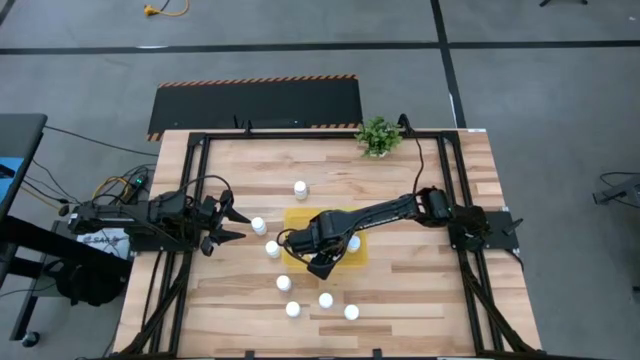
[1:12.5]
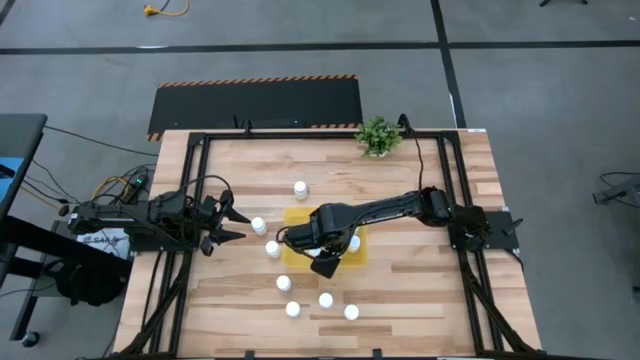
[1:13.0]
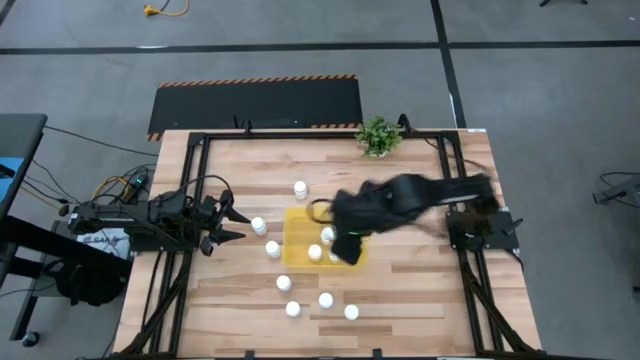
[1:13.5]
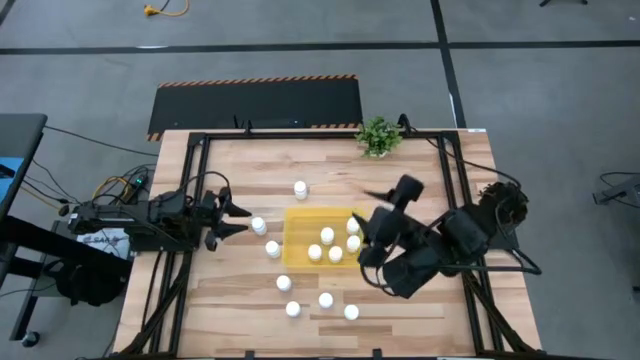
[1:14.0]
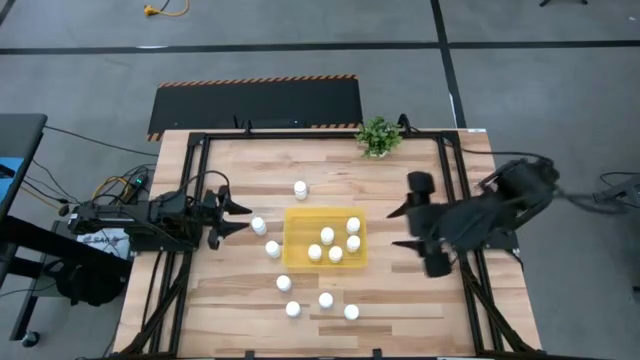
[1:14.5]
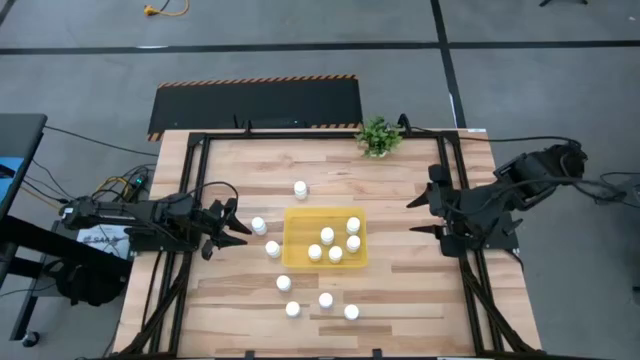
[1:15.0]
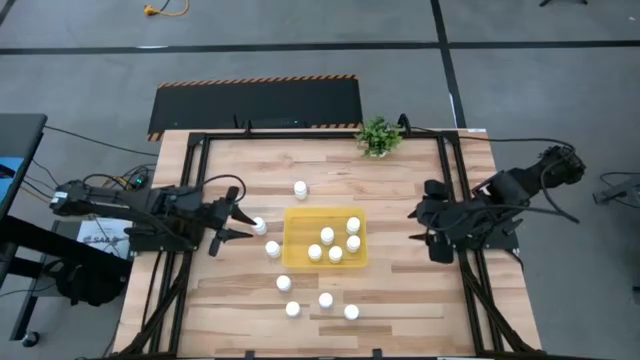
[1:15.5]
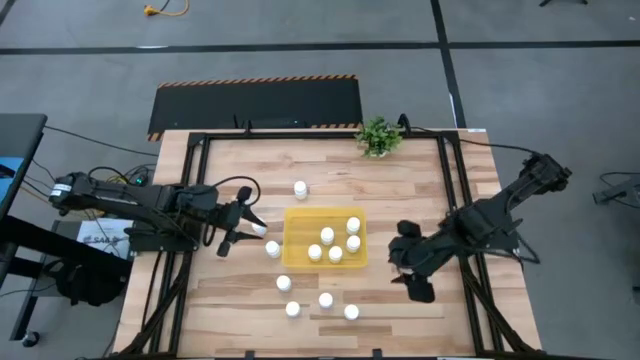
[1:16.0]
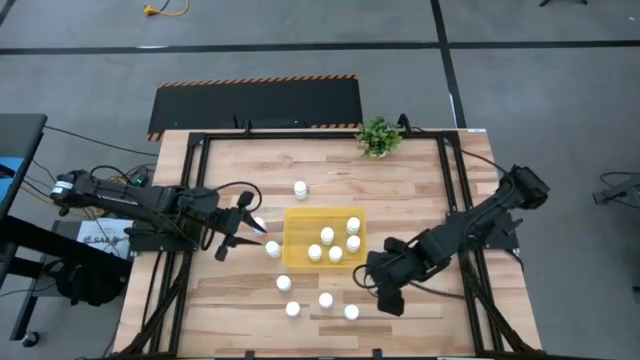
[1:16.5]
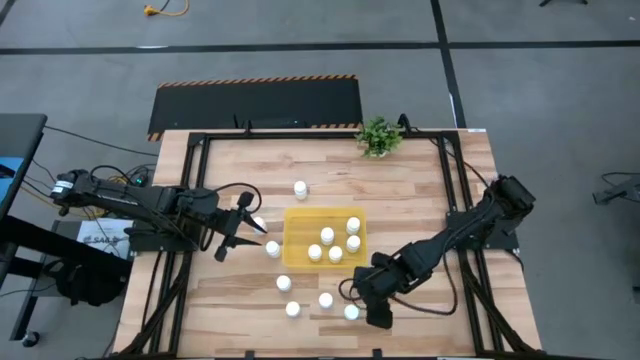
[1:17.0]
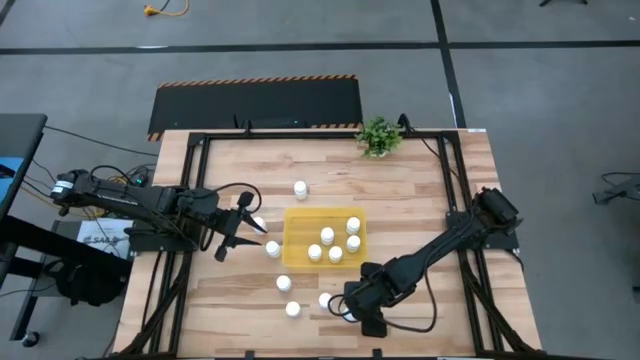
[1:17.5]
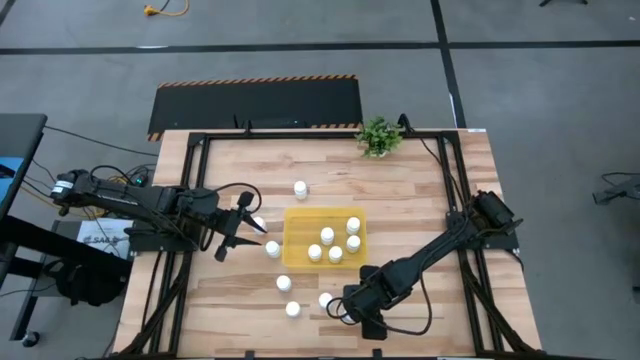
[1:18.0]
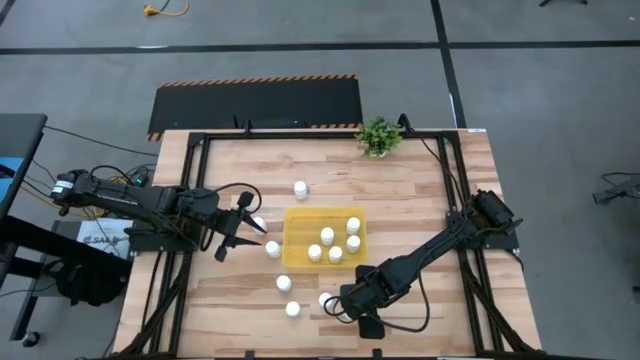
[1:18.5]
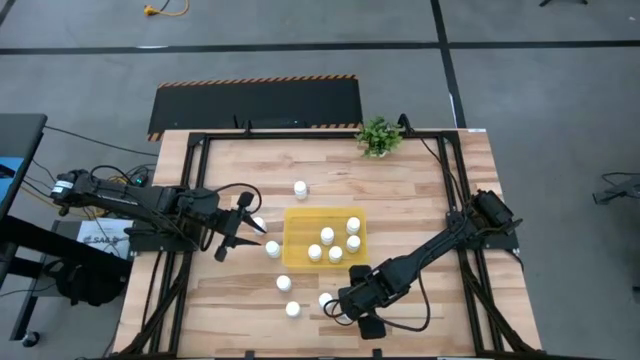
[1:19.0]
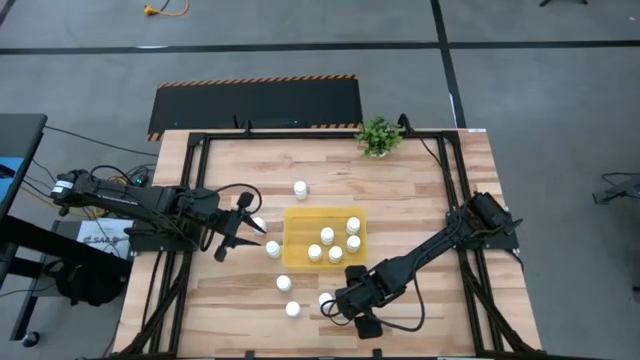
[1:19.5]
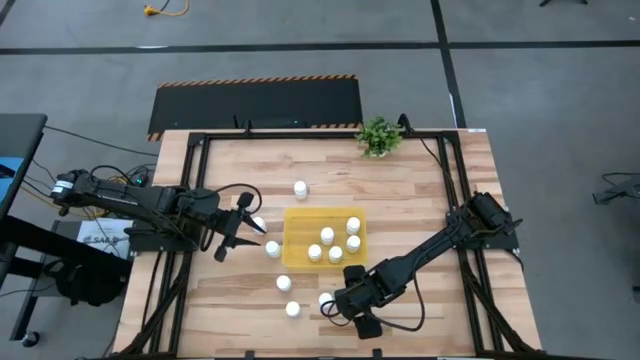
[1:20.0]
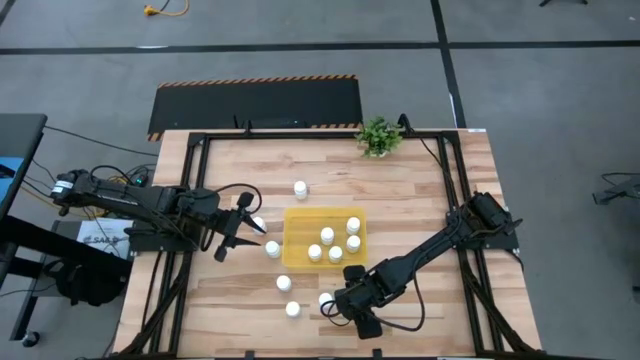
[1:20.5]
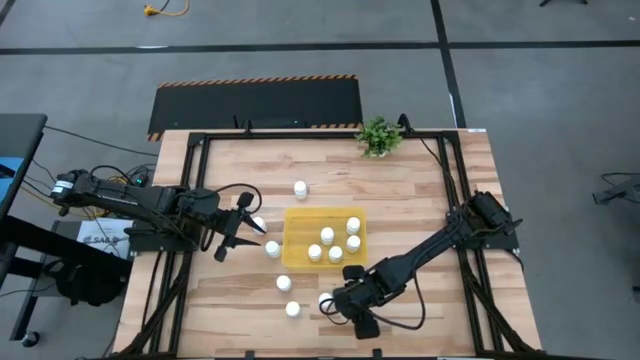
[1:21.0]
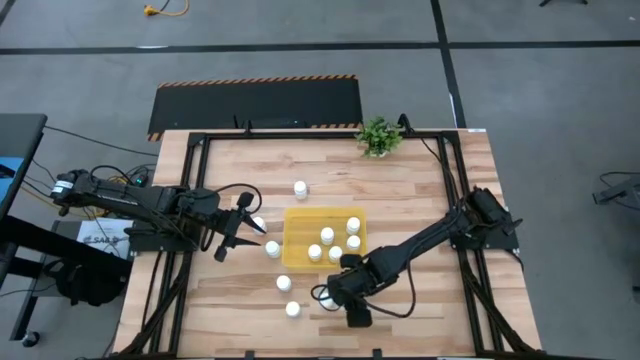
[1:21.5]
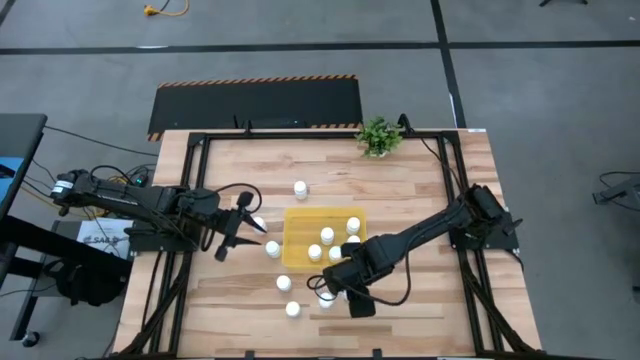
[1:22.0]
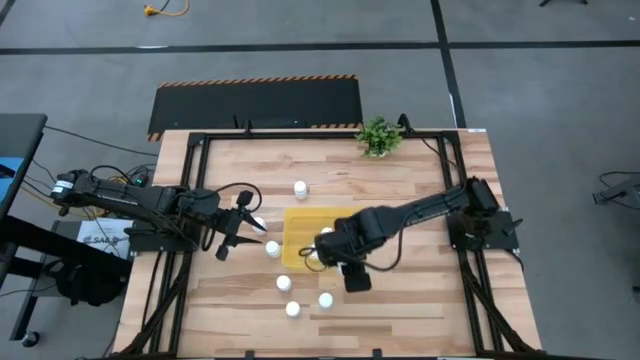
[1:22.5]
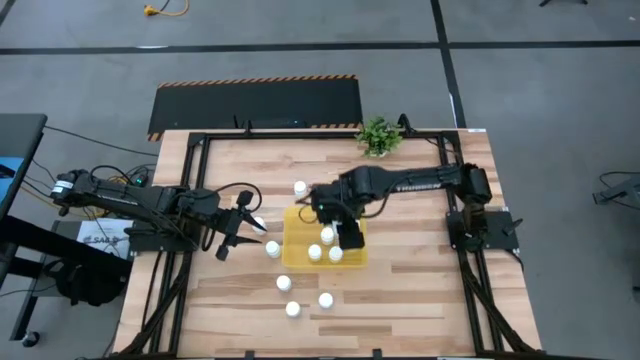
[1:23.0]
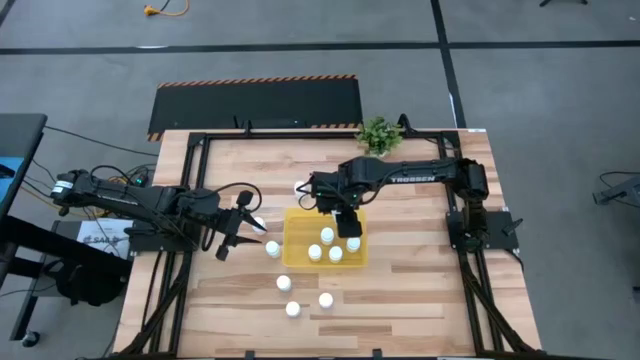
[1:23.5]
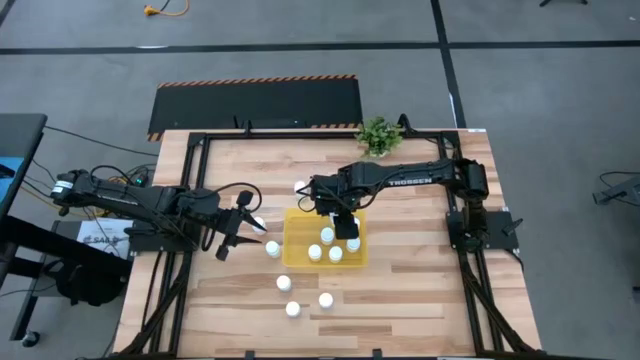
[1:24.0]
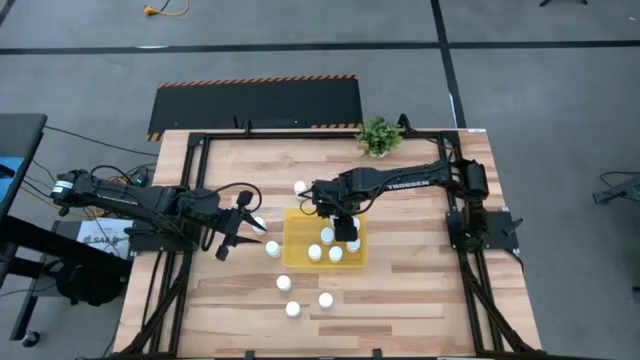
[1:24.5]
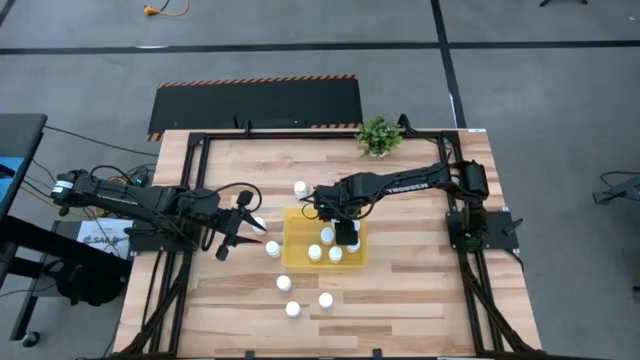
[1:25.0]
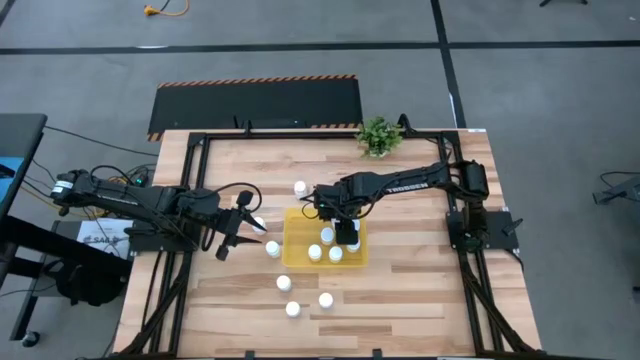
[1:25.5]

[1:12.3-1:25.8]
Task: Pick and place pill bottles into a basket
Put the white pill bottle into the yellow bin

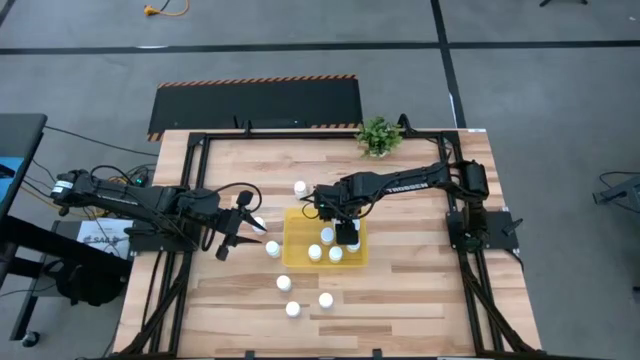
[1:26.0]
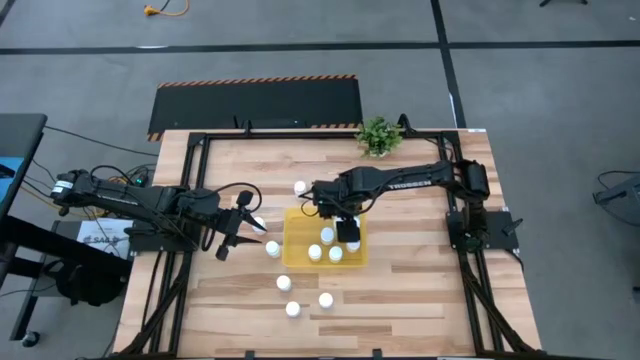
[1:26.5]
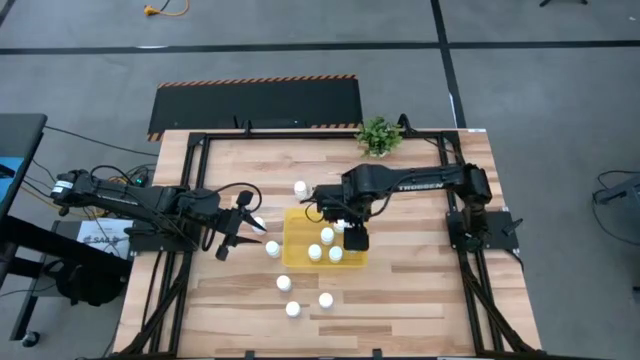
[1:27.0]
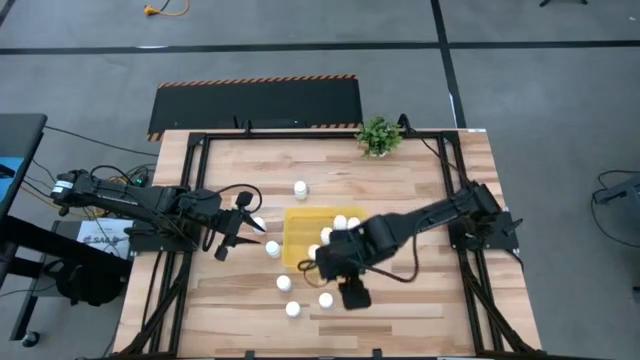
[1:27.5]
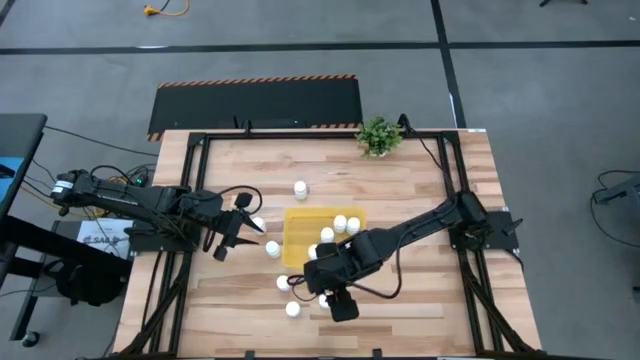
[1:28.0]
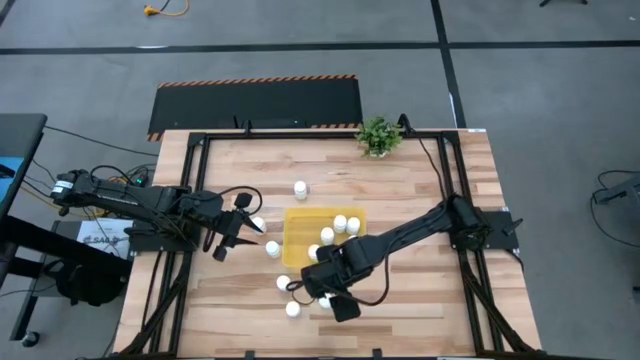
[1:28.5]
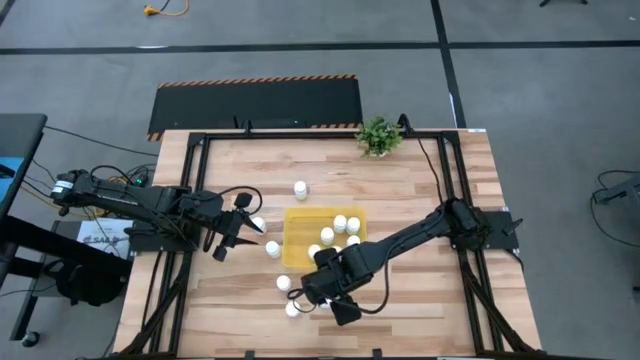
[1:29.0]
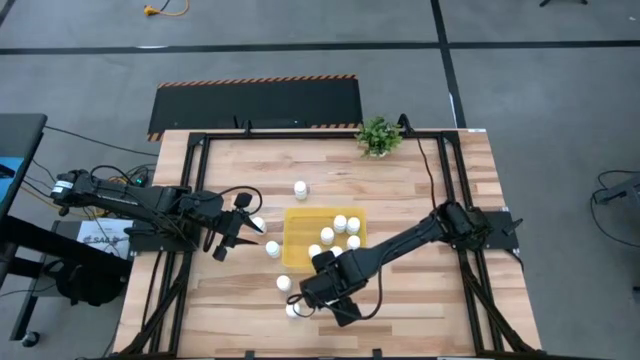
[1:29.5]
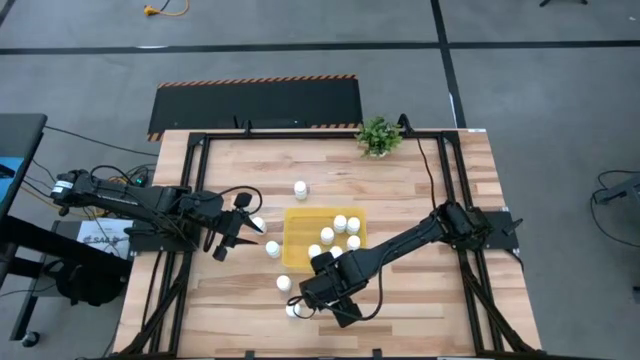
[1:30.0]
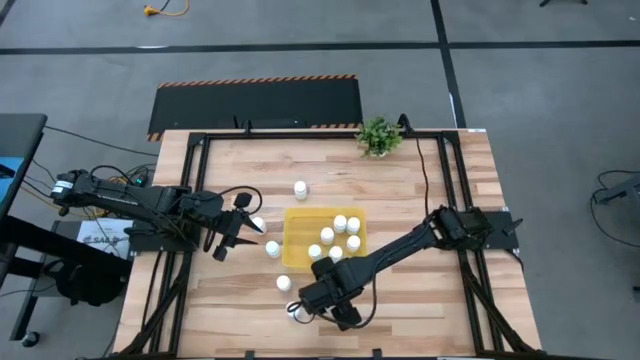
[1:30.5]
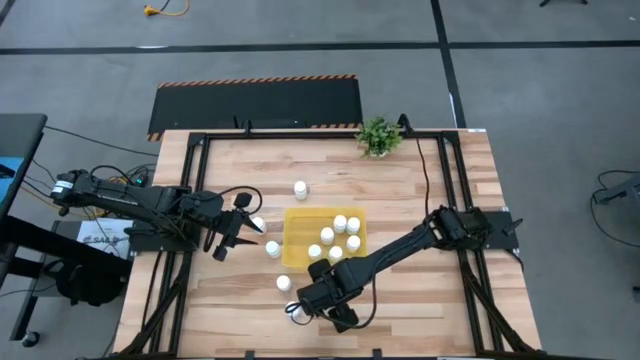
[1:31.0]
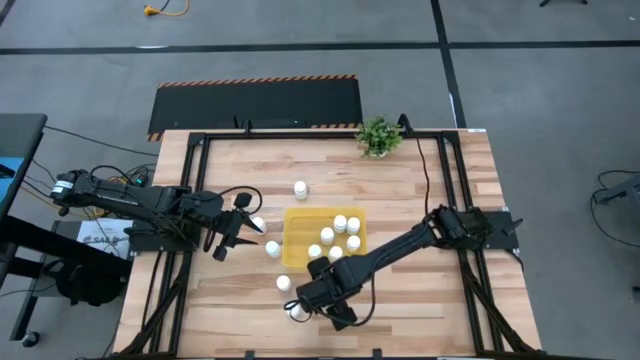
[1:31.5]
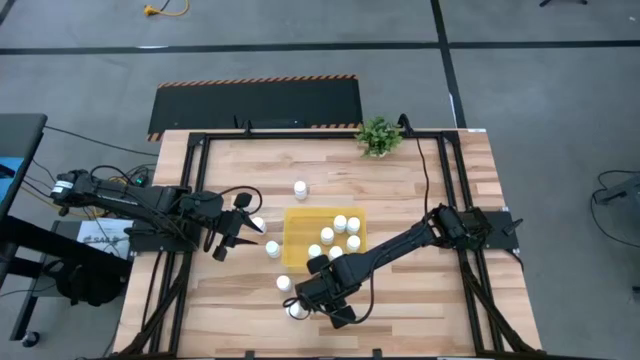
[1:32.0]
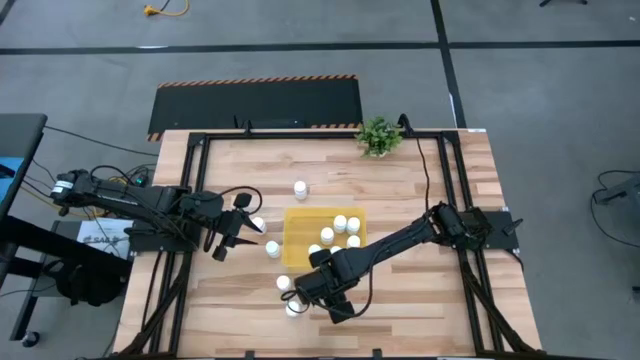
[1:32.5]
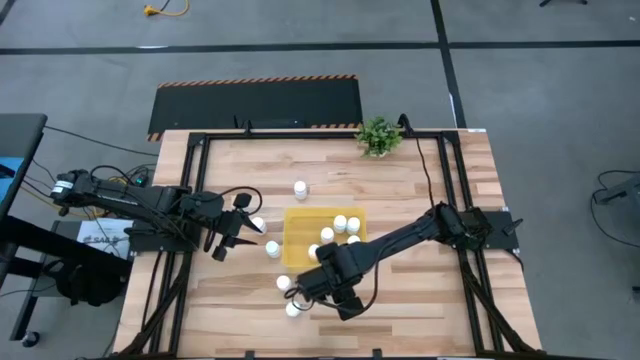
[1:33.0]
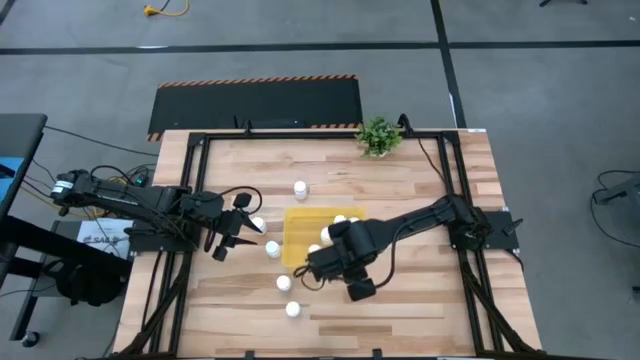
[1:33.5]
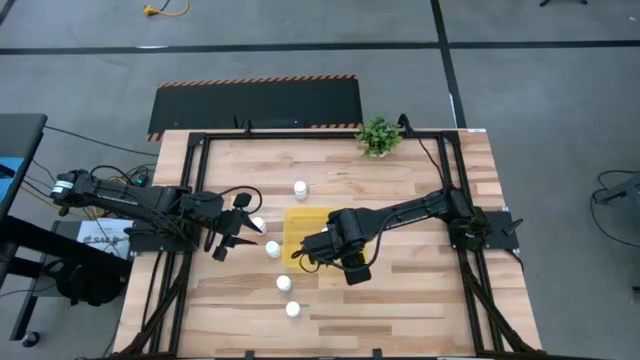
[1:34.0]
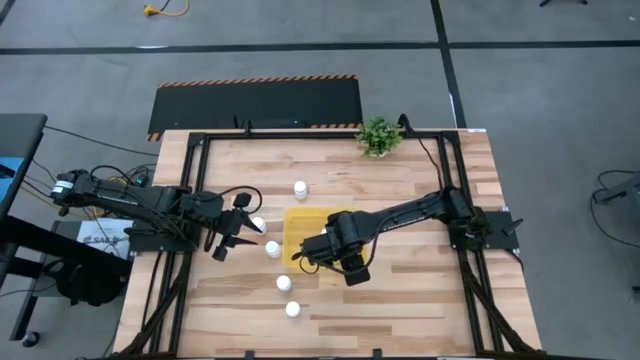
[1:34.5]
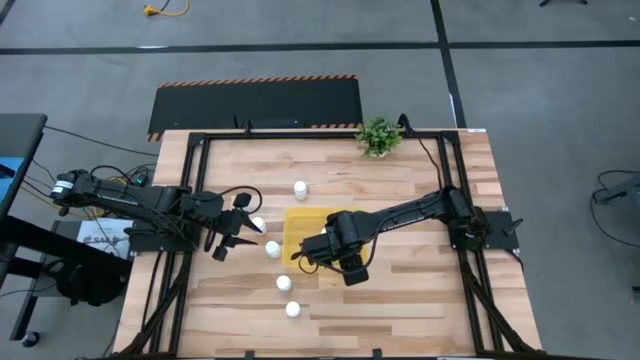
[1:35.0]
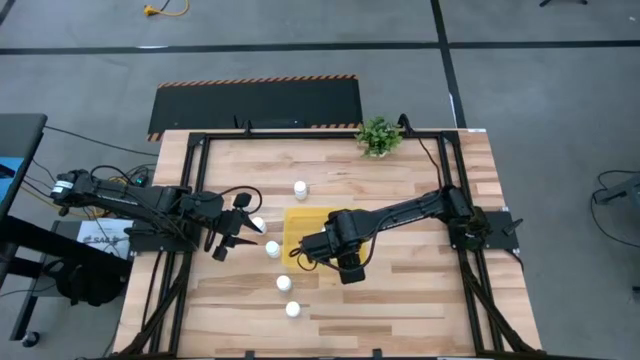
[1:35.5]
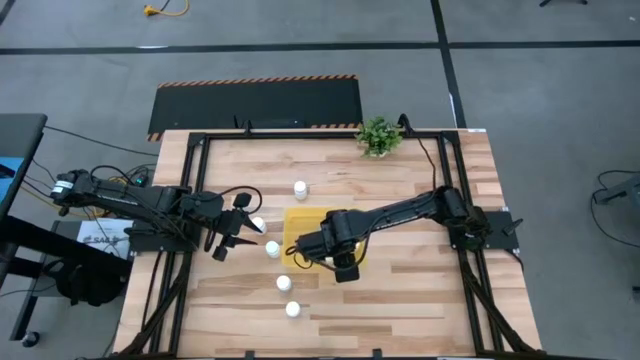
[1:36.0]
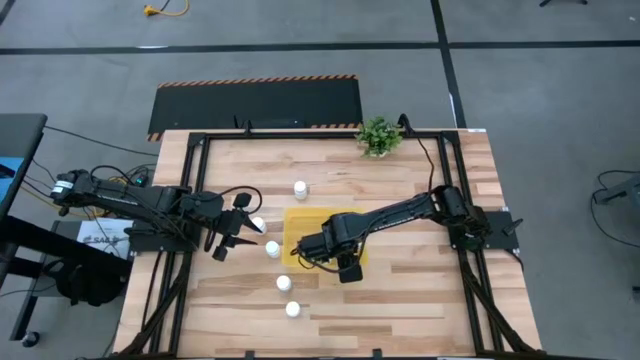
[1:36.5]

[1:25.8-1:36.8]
Put the white pill bottle into the yellow bin
